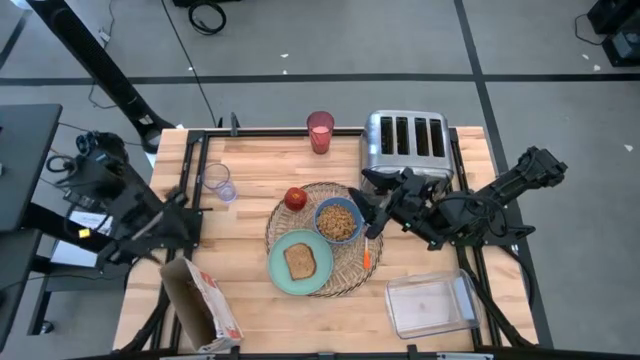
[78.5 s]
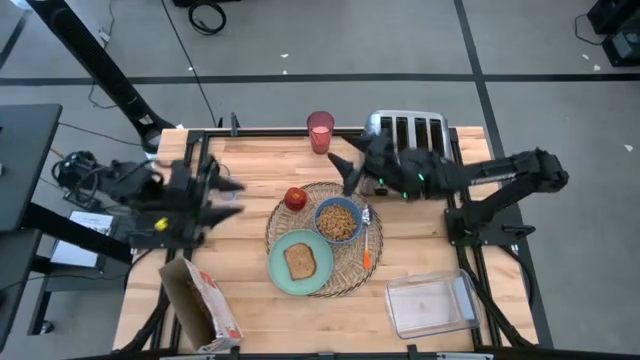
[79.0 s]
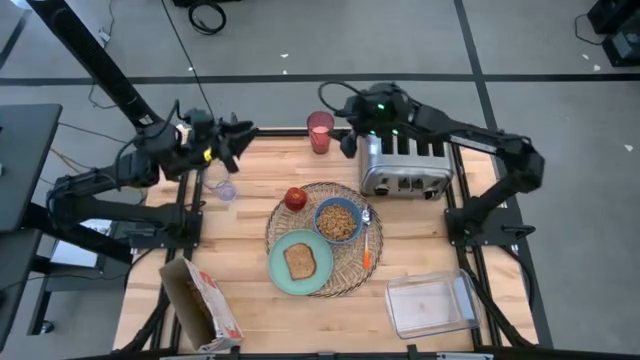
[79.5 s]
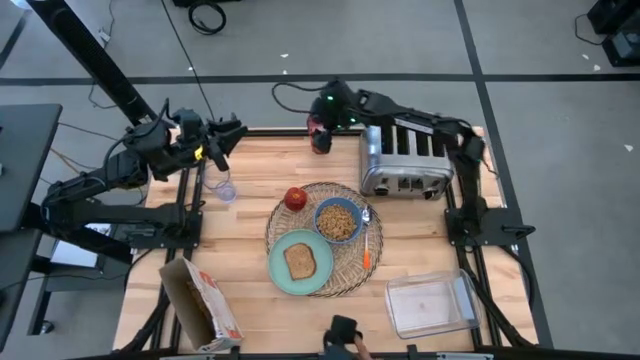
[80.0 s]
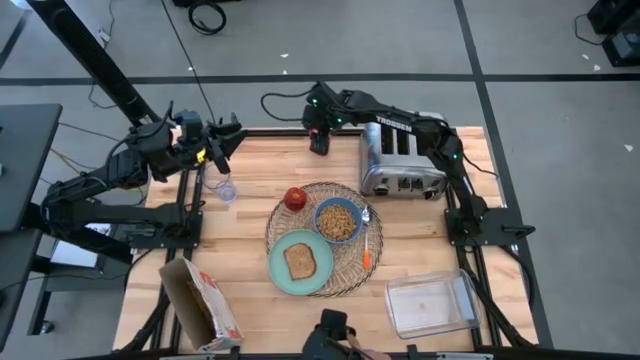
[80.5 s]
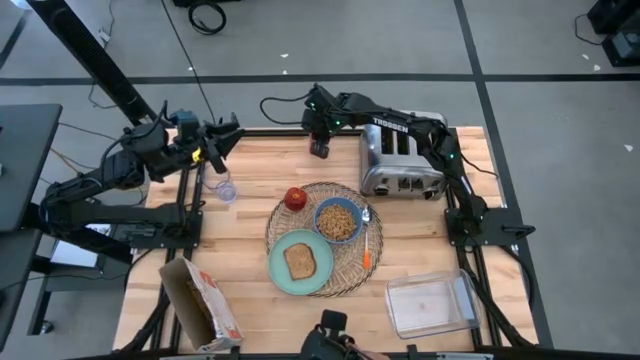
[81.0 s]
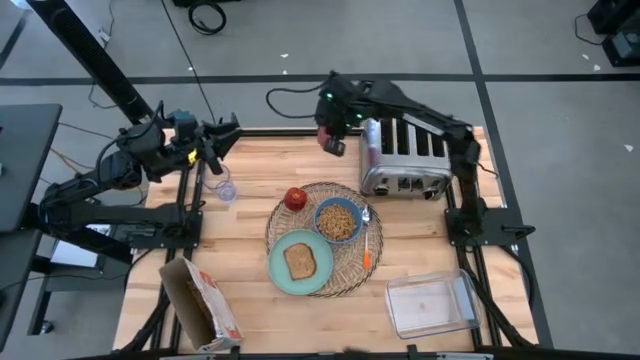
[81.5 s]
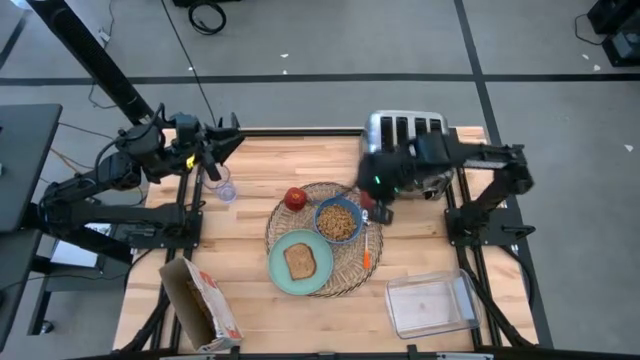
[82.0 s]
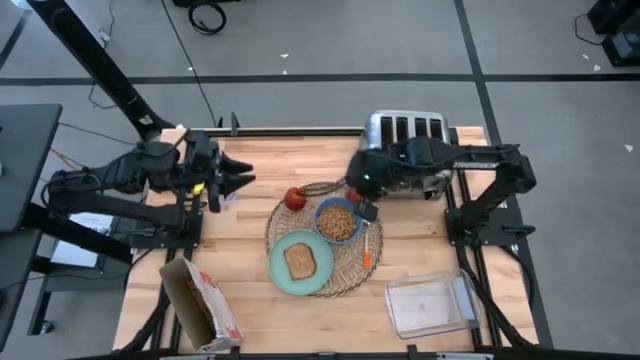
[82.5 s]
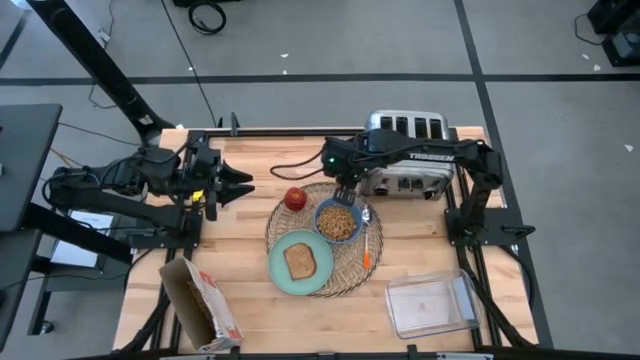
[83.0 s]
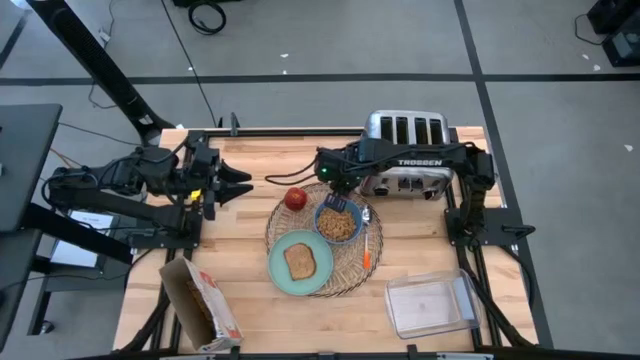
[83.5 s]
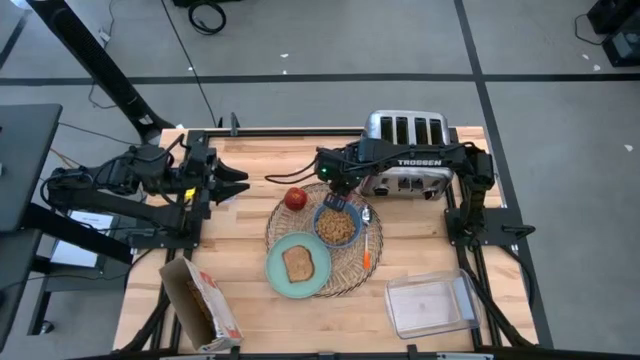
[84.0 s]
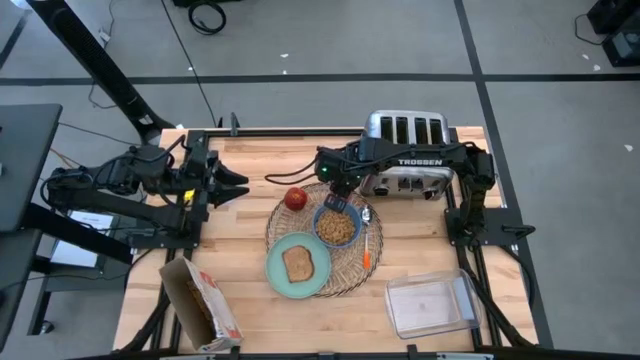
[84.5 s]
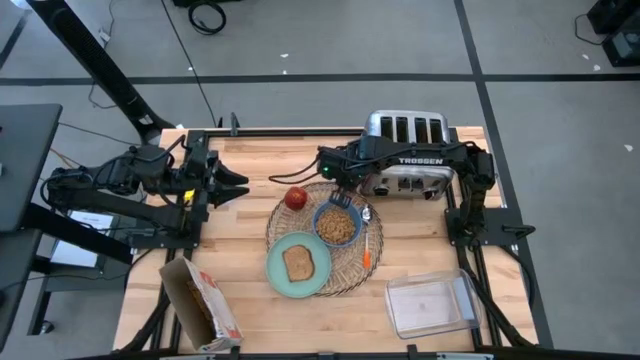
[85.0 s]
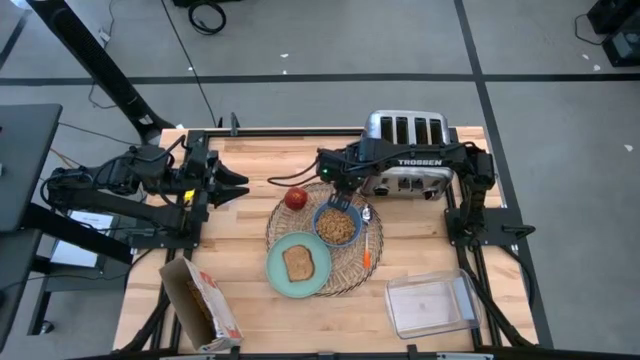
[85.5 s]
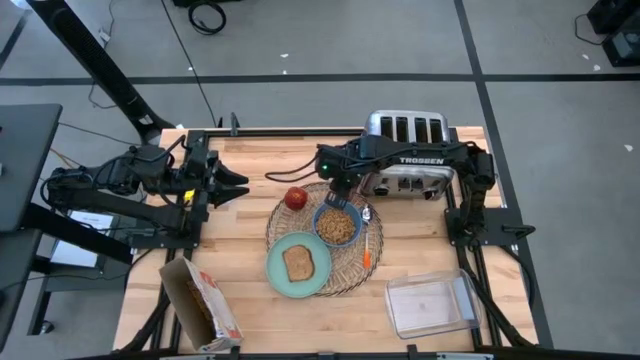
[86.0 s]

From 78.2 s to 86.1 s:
Task: Arrange a breakfast setting
Put the red cup on the placemat to the top of the blue bowl

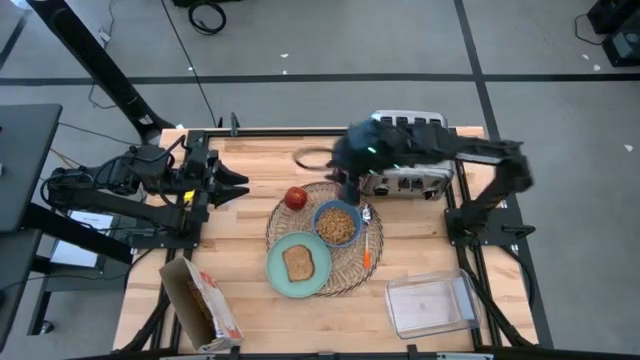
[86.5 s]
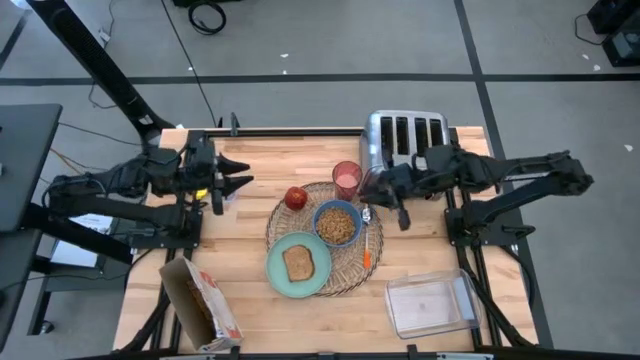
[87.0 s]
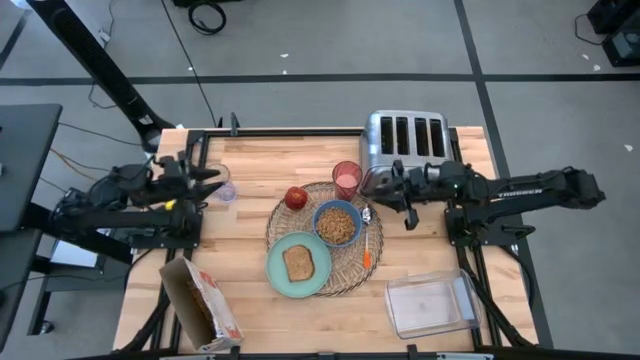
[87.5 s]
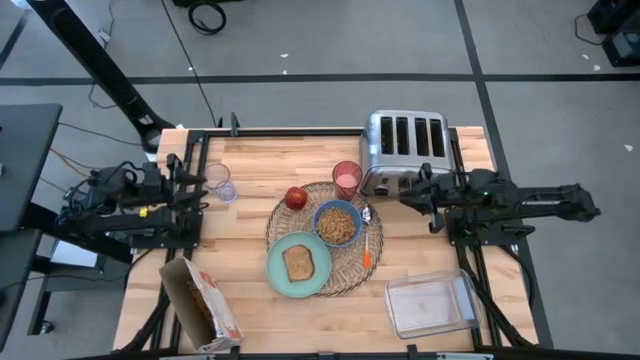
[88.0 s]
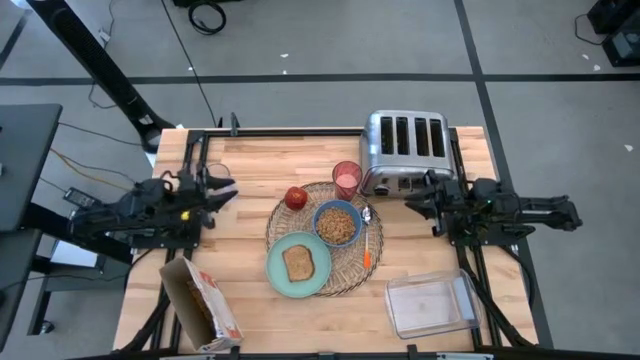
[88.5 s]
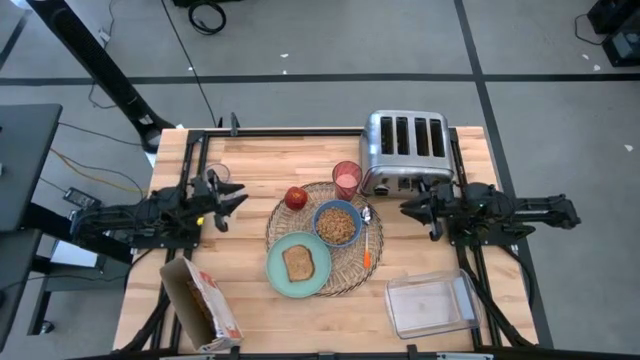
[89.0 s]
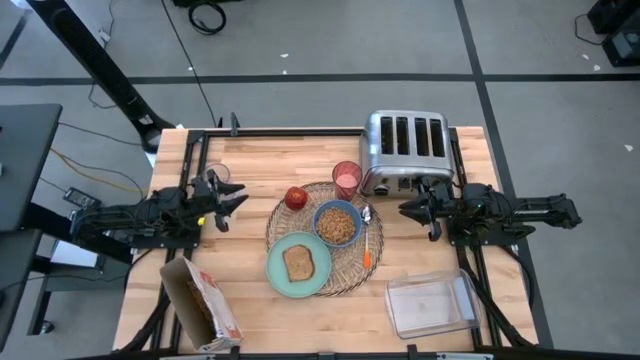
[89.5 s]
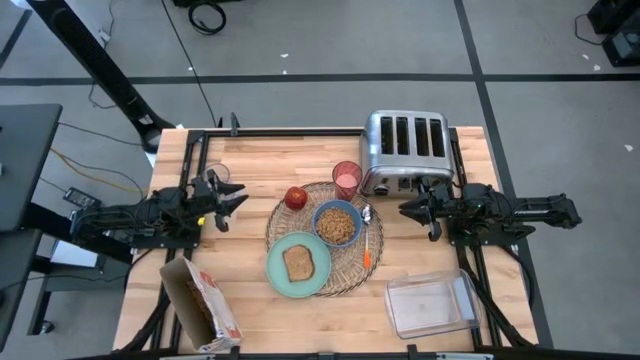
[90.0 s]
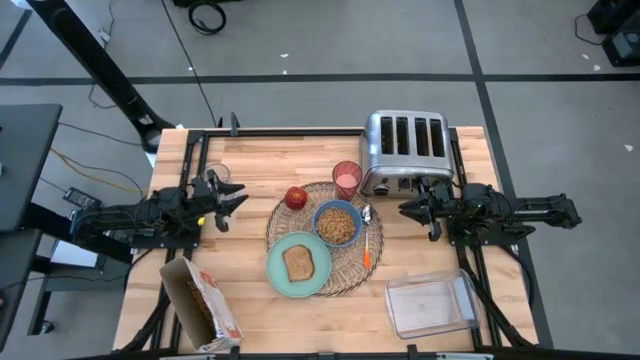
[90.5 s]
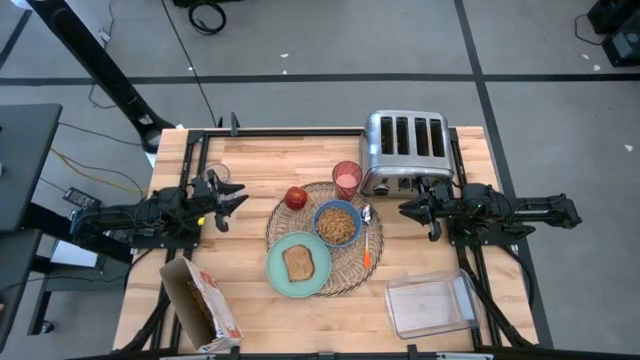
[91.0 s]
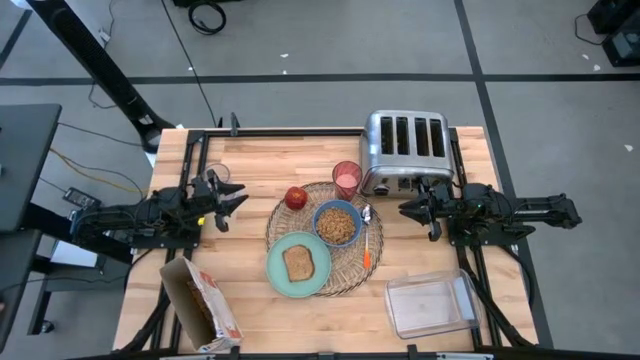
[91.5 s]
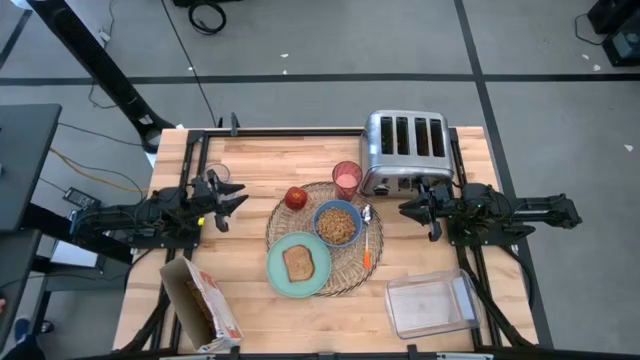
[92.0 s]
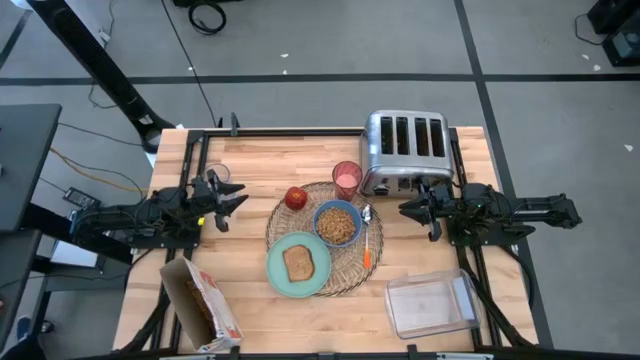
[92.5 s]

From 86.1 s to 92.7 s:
Return to Home Position

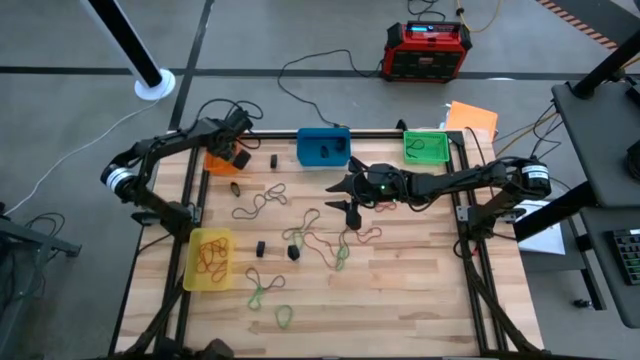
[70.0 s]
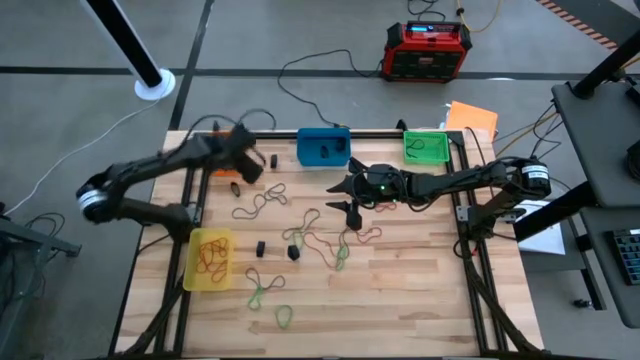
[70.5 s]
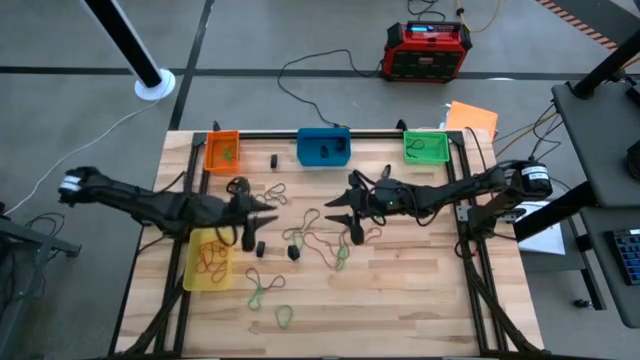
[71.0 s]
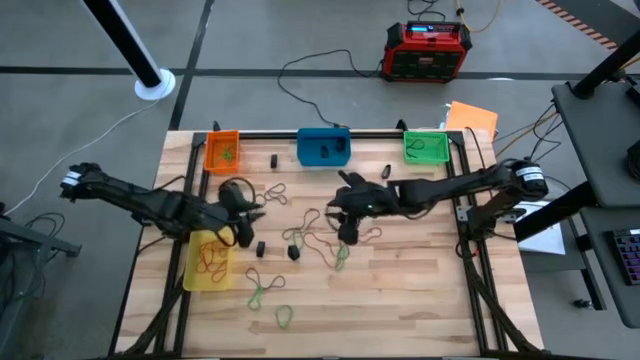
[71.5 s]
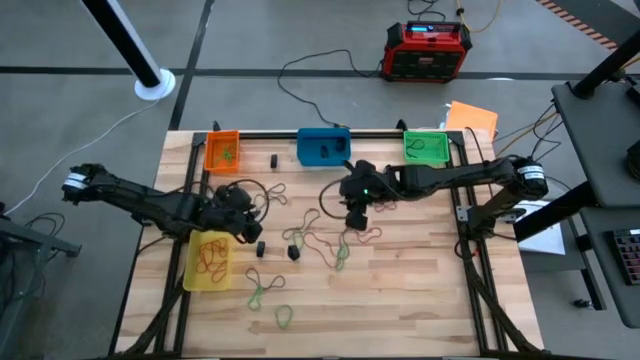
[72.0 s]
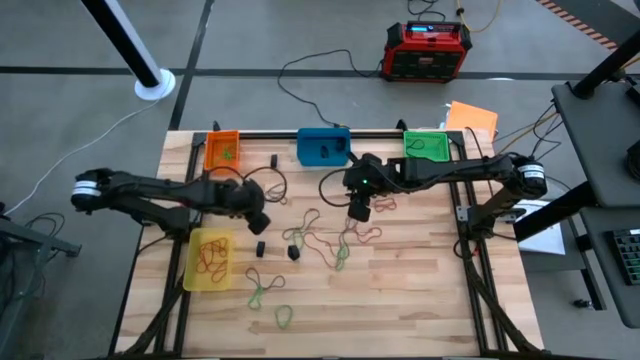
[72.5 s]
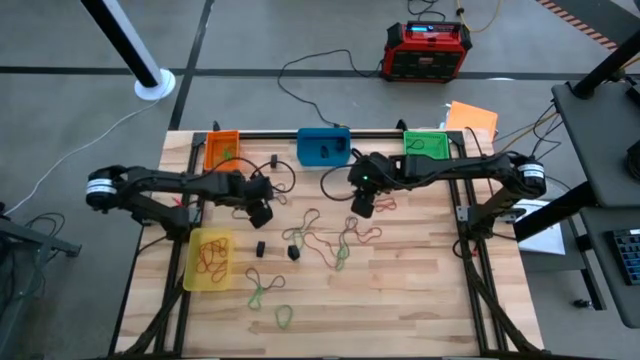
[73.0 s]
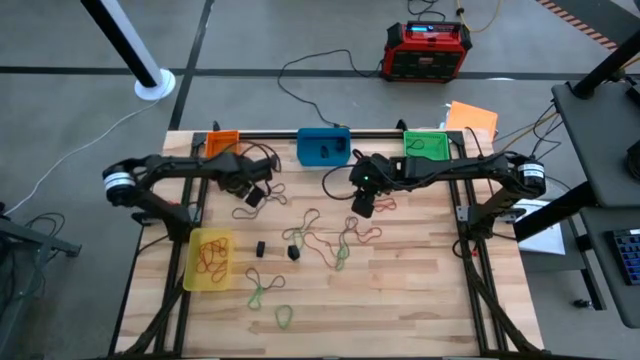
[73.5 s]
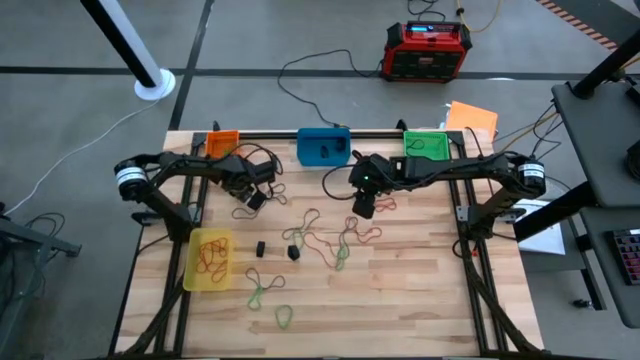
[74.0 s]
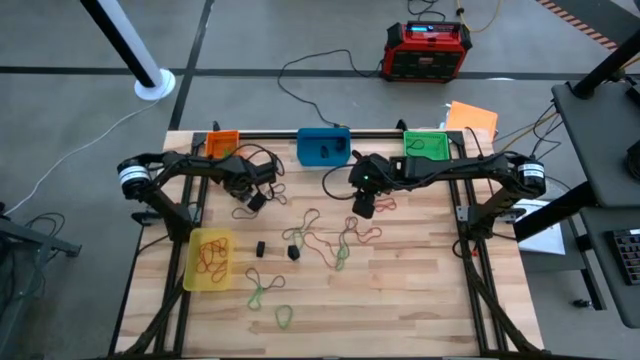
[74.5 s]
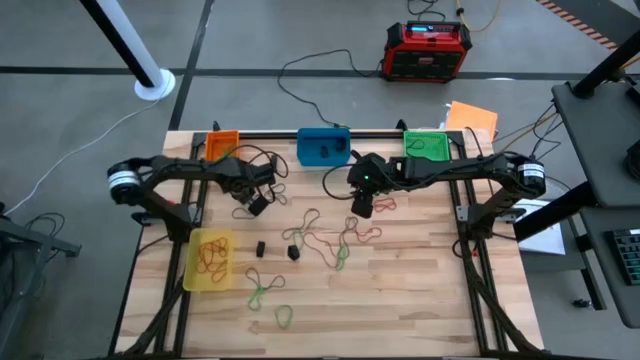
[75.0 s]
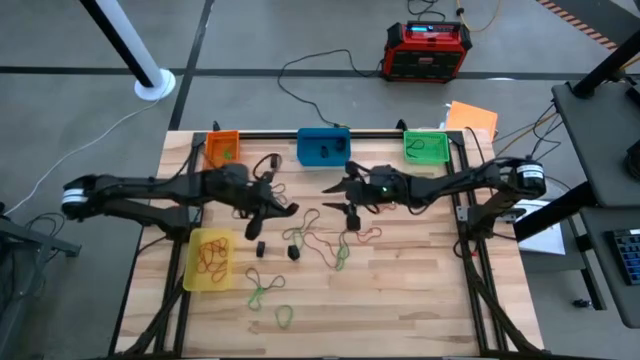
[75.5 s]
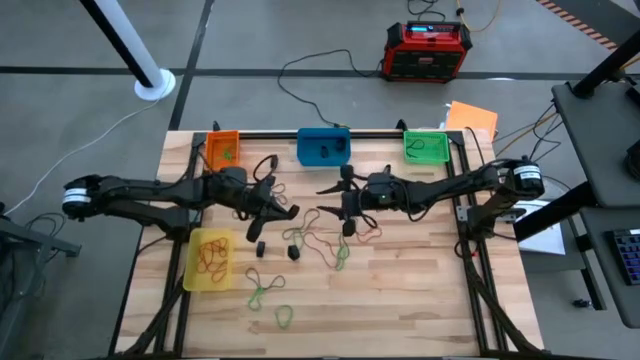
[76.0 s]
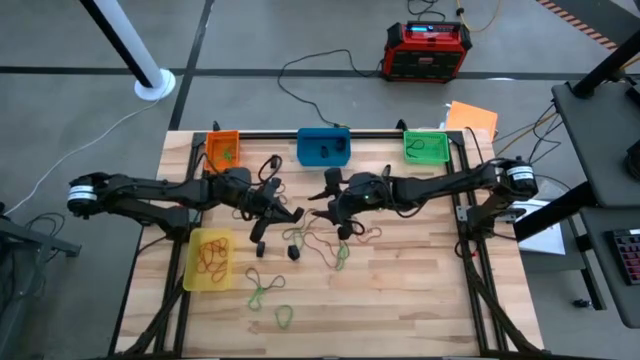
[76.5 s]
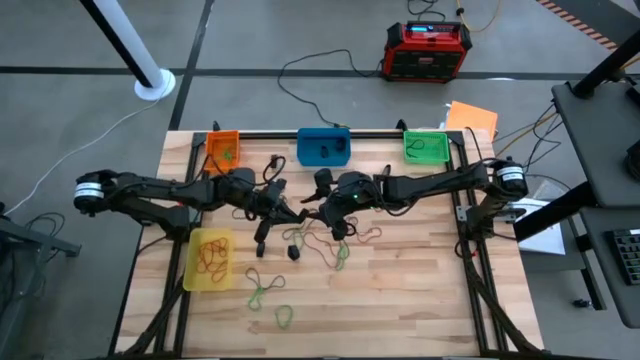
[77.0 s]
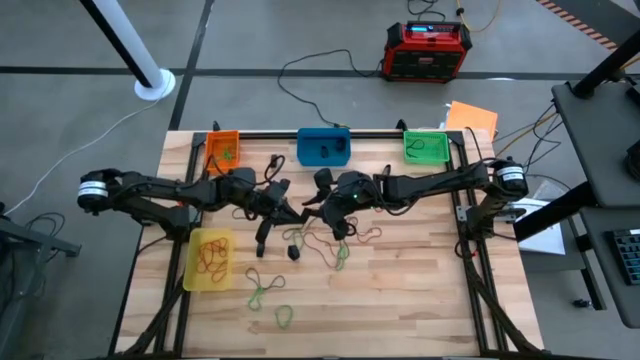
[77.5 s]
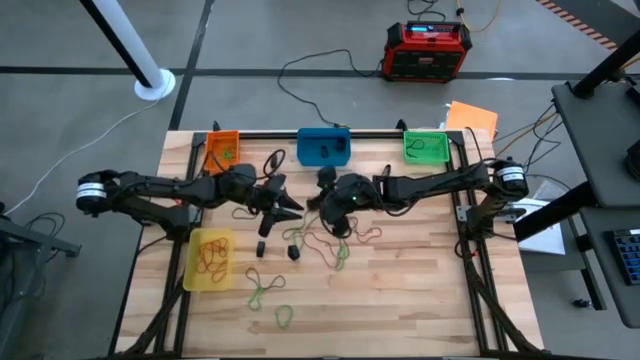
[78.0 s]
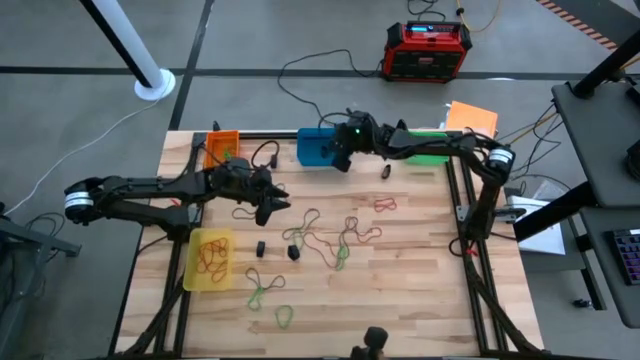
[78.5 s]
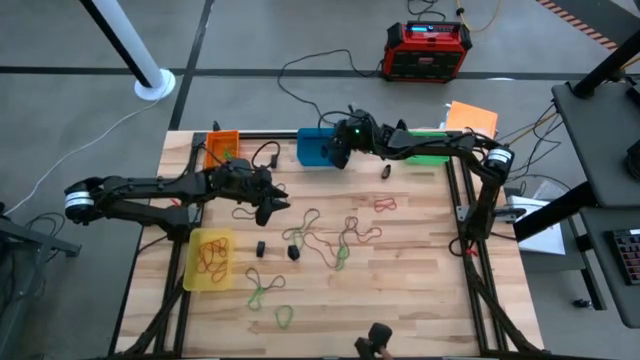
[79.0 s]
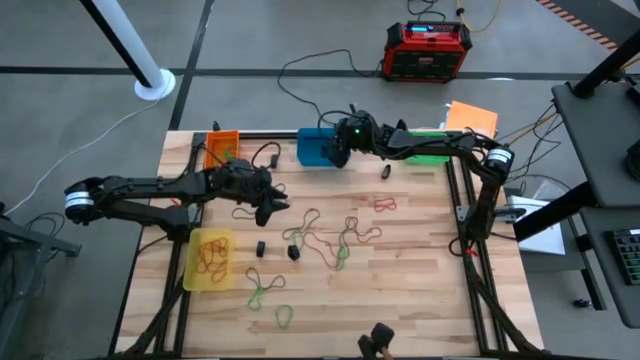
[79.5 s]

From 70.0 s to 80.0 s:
Task: Sort rubber bands into baskets
Put the black rubber band into the blue bin
